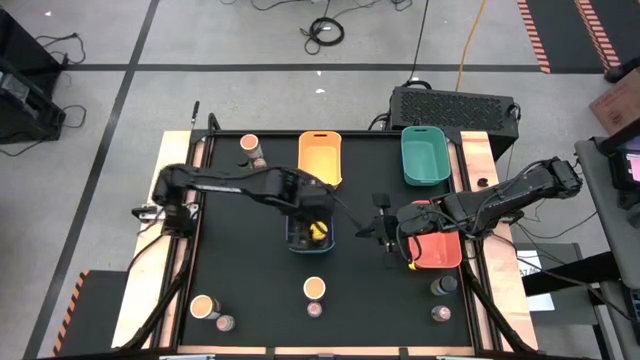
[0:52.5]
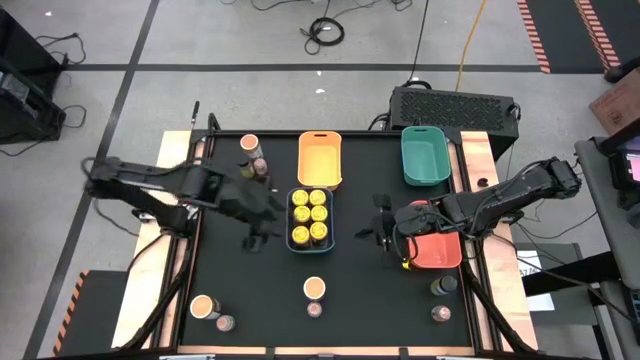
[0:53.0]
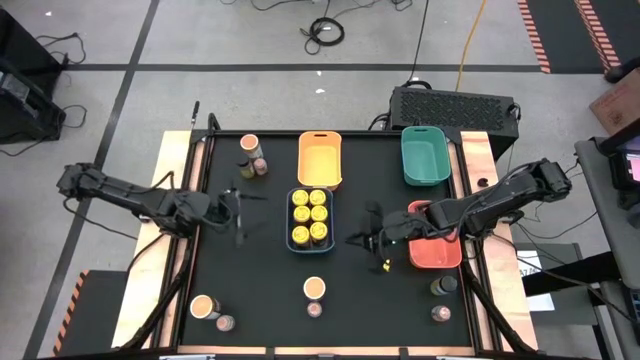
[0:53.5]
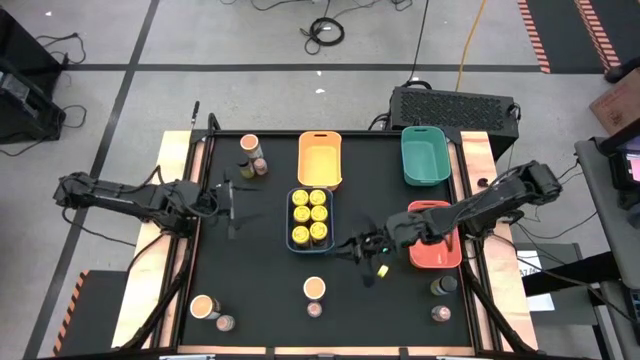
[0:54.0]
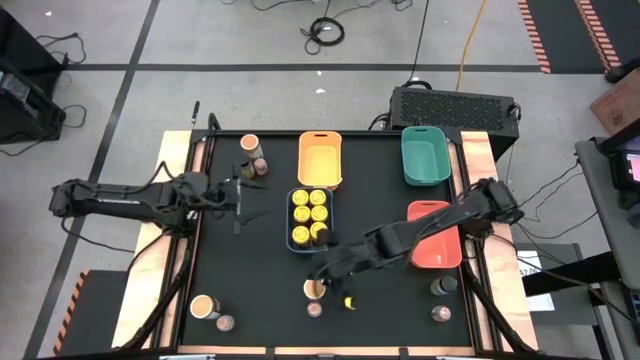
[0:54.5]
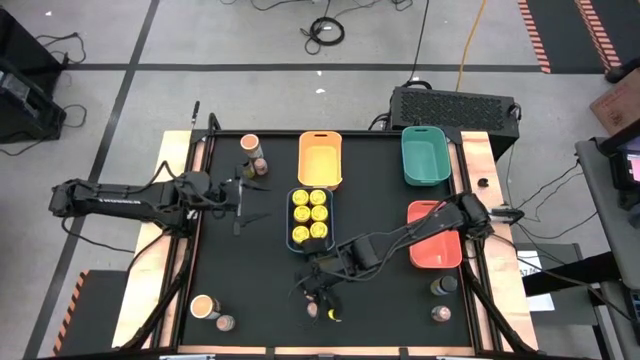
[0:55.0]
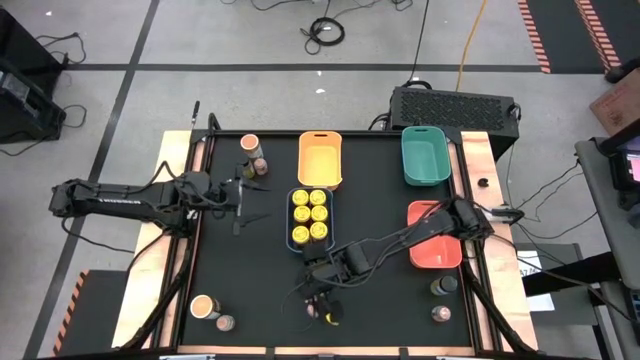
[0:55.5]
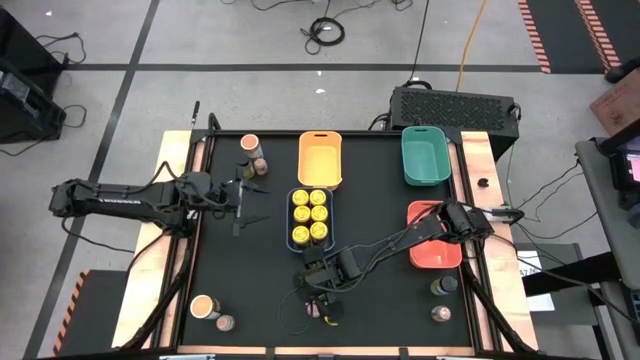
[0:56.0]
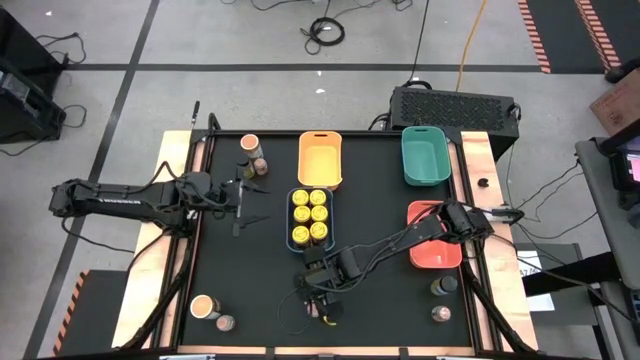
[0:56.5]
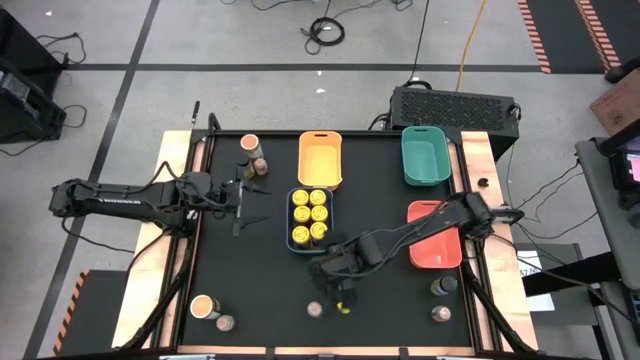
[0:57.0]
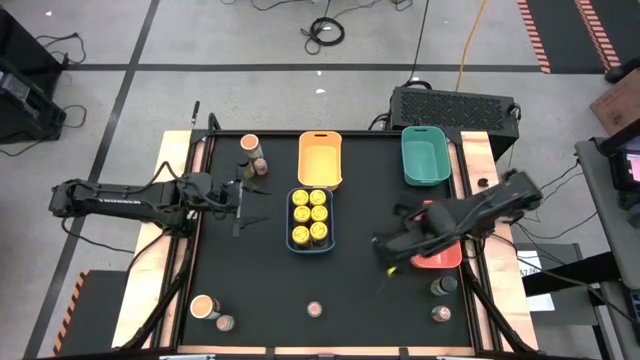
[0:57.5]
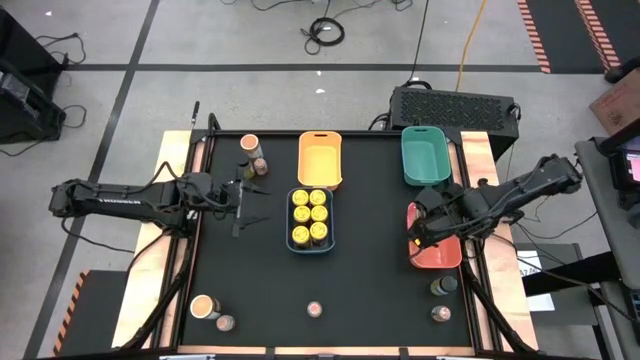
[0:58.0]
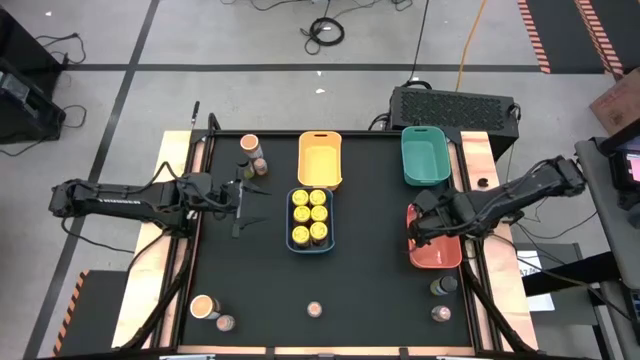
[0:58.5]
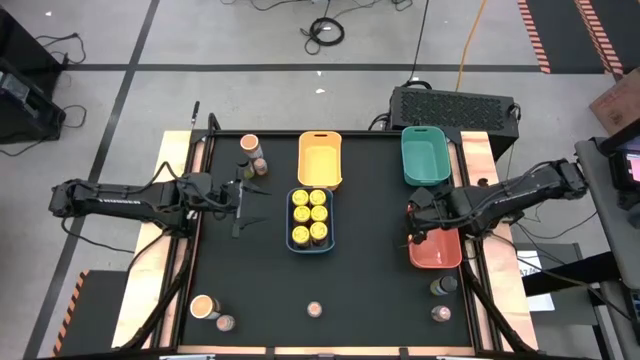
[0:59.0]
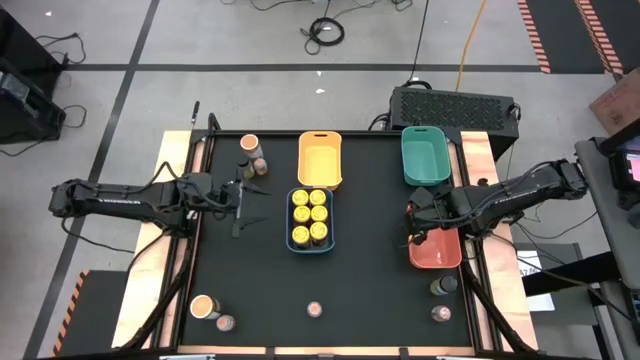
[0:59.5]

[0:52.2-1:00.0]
Task: Sort spices by type
Put the gold seasoning bottle into the orange bin

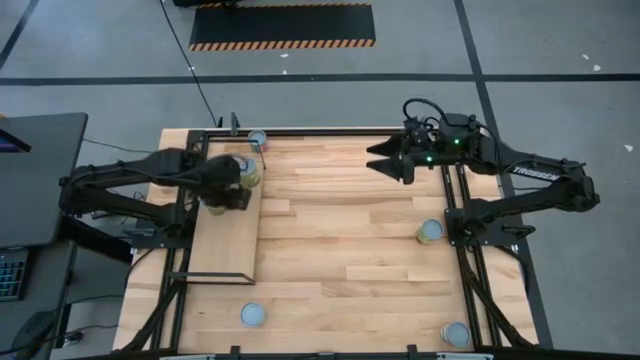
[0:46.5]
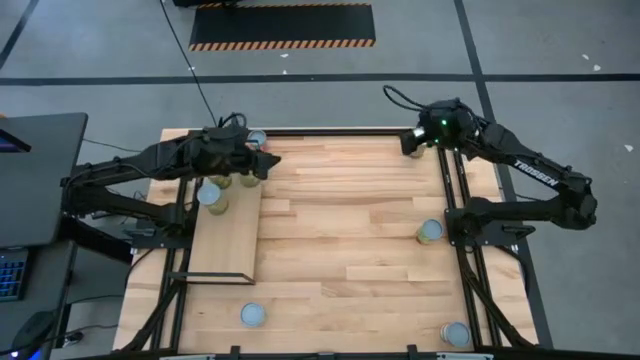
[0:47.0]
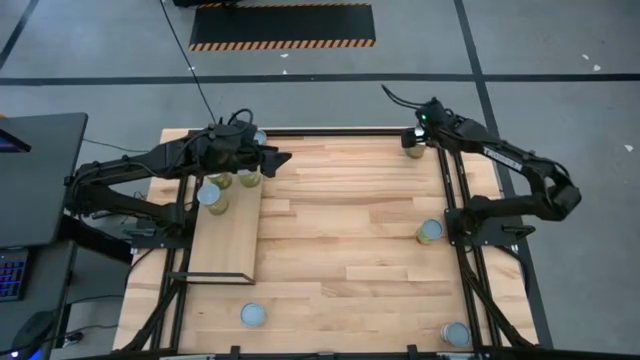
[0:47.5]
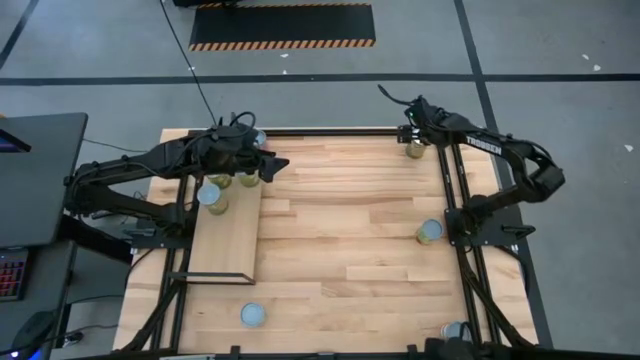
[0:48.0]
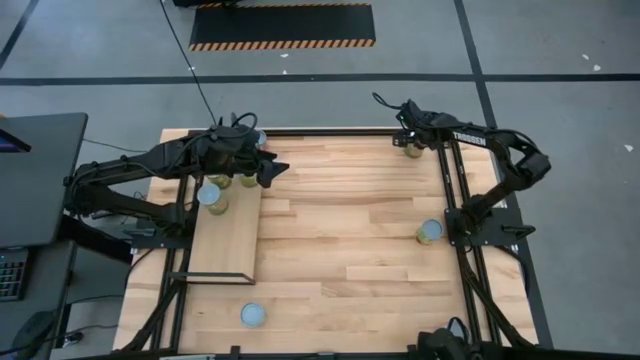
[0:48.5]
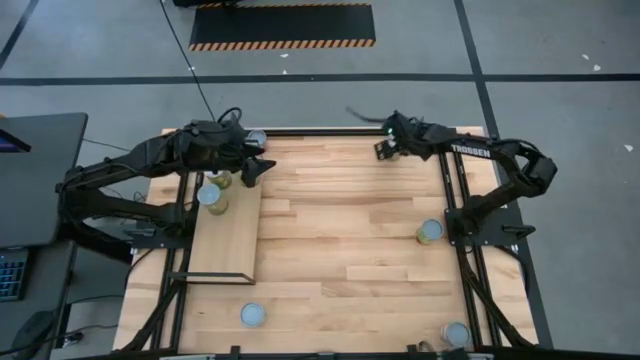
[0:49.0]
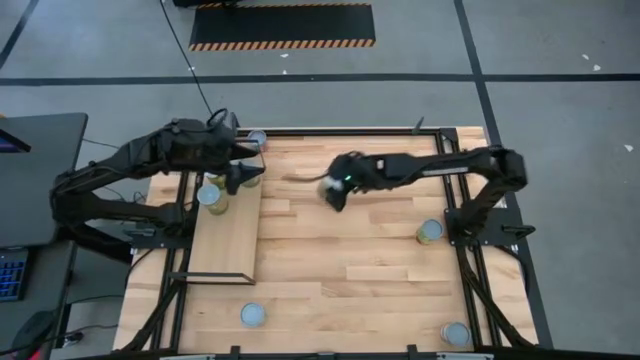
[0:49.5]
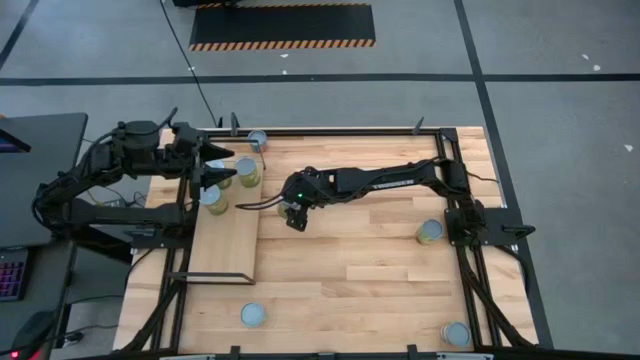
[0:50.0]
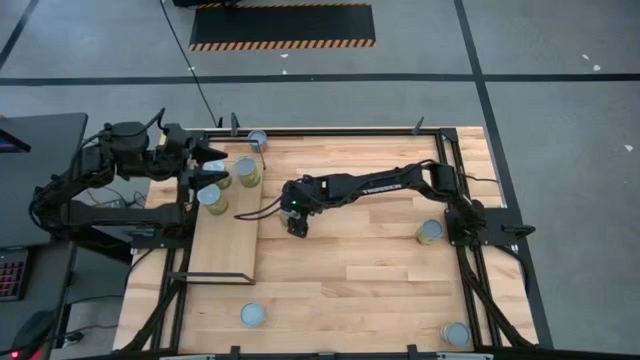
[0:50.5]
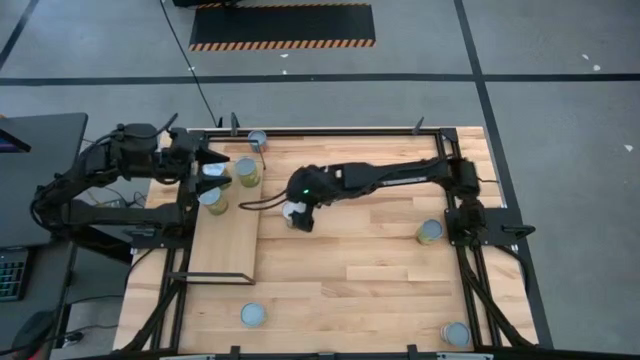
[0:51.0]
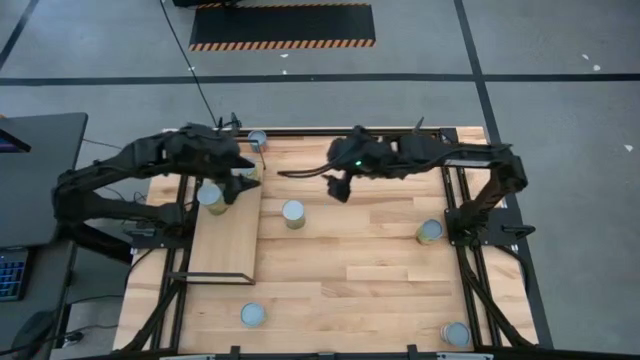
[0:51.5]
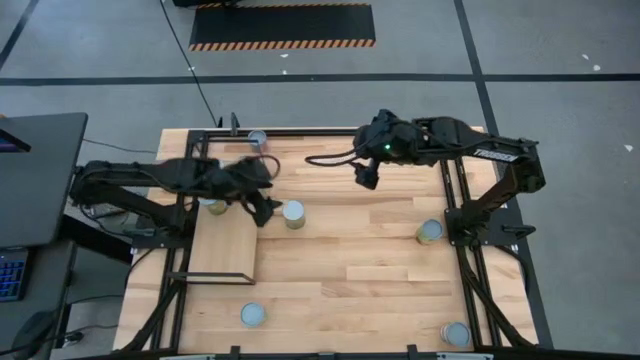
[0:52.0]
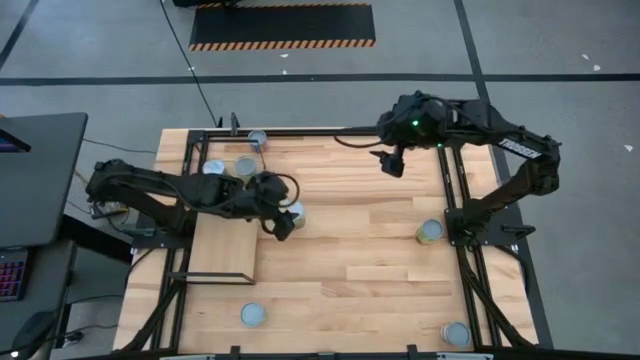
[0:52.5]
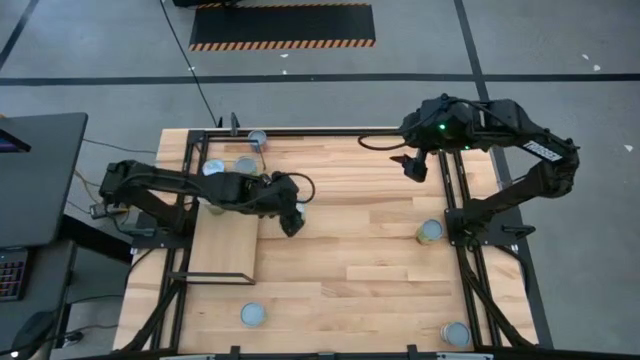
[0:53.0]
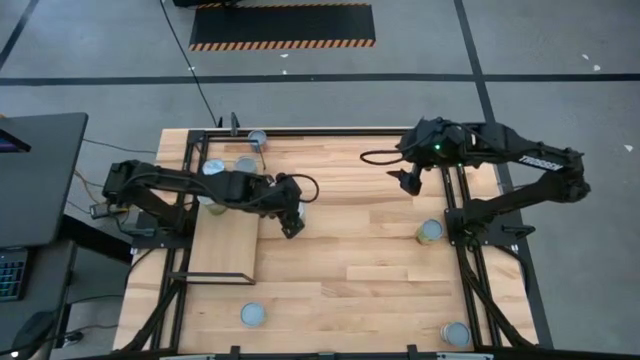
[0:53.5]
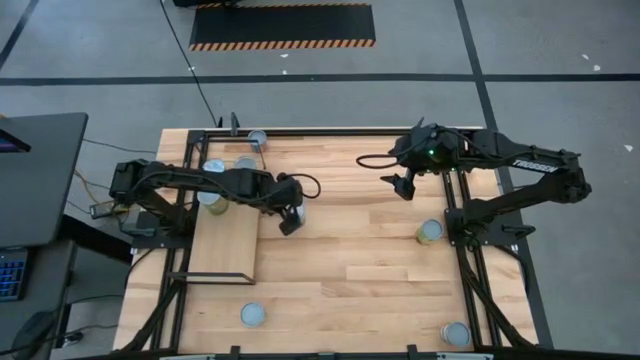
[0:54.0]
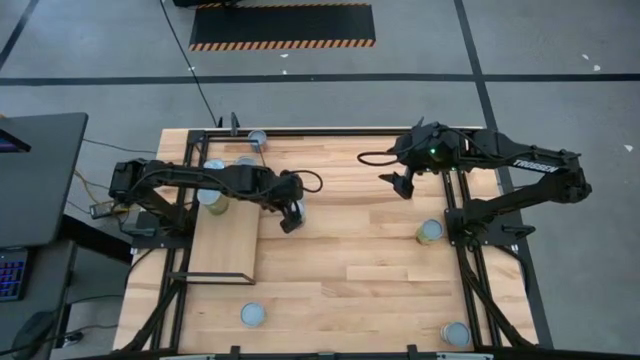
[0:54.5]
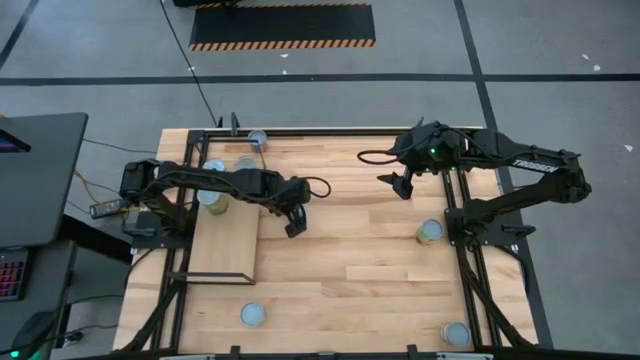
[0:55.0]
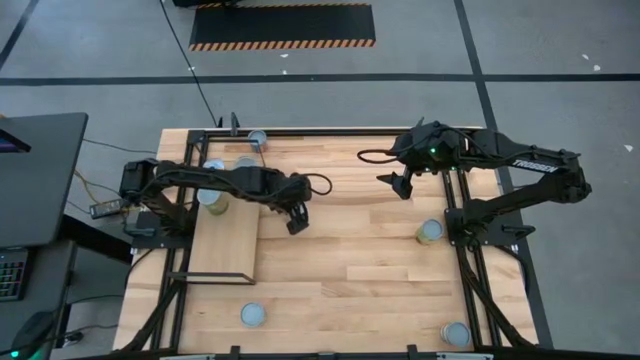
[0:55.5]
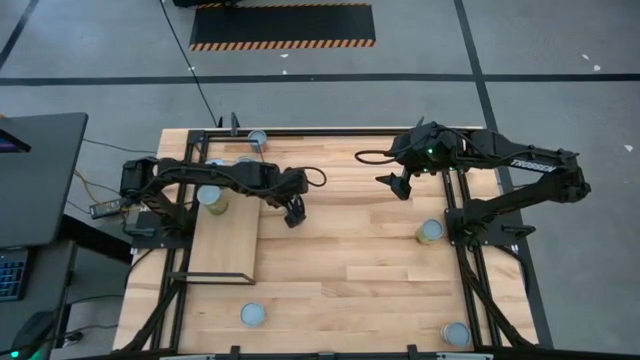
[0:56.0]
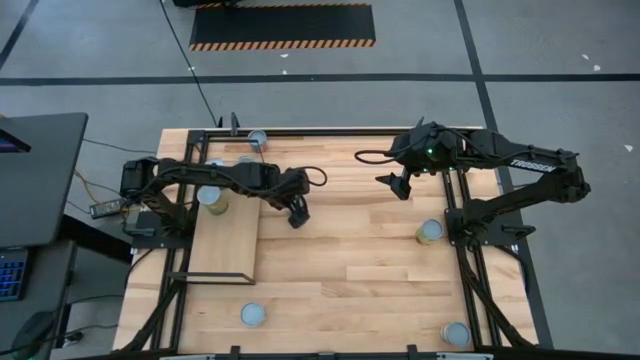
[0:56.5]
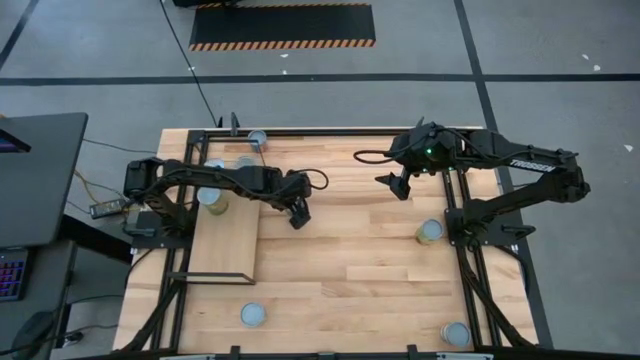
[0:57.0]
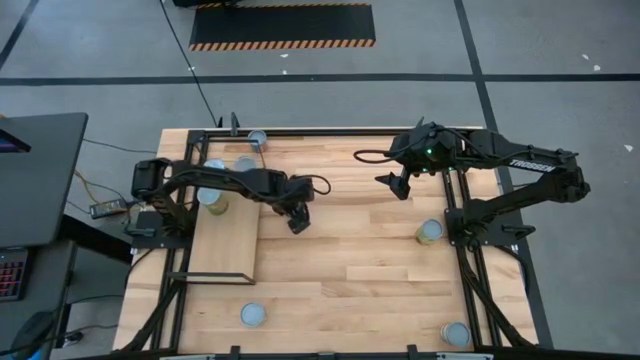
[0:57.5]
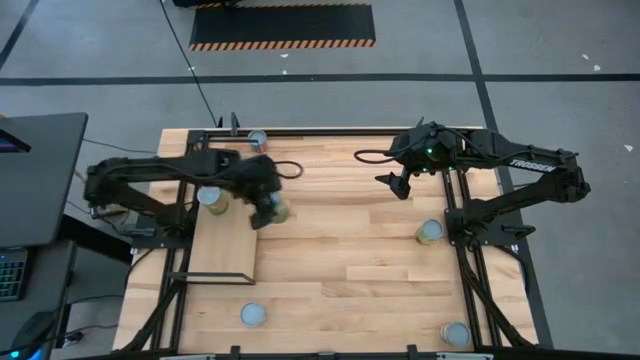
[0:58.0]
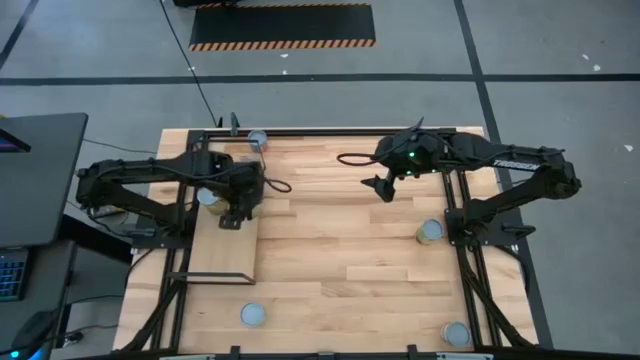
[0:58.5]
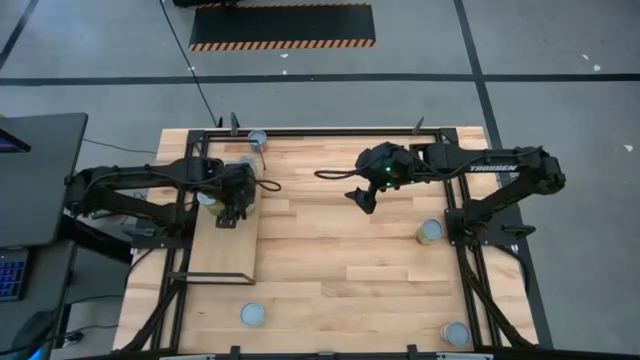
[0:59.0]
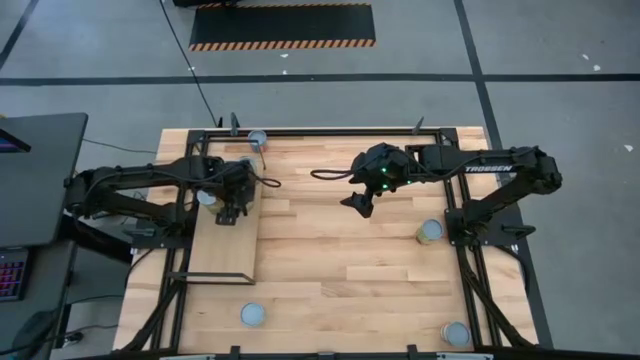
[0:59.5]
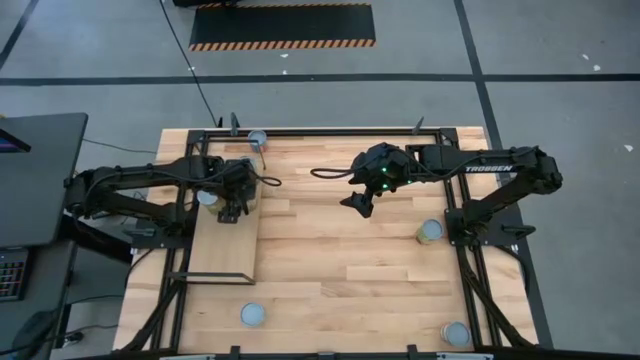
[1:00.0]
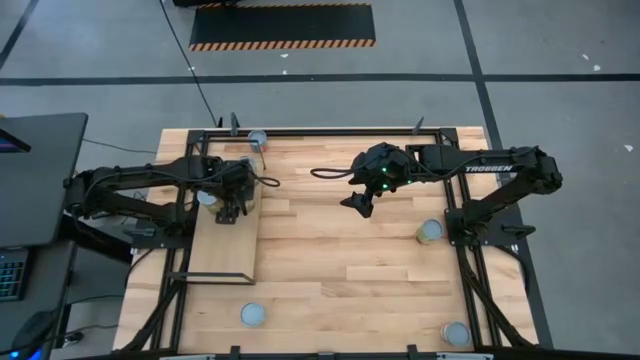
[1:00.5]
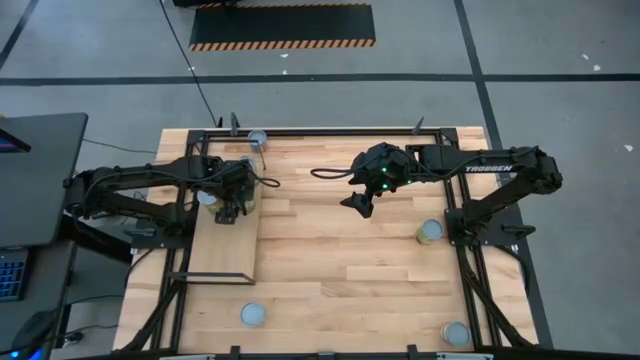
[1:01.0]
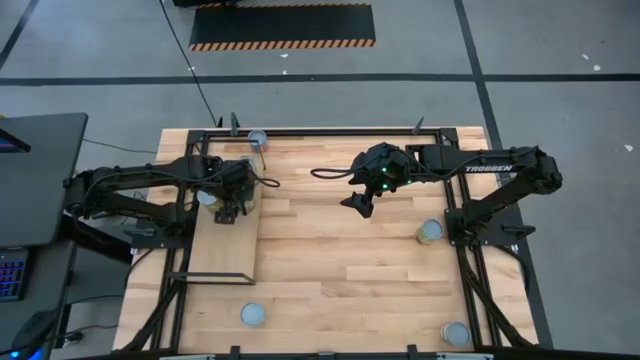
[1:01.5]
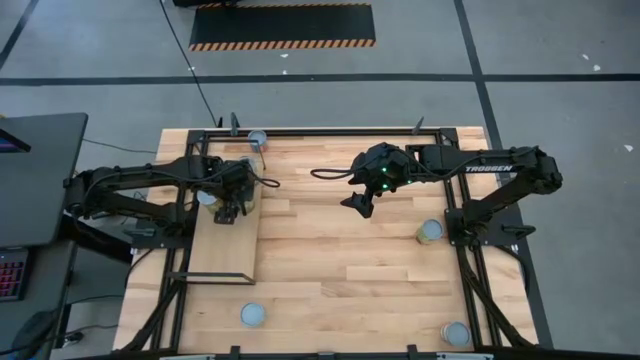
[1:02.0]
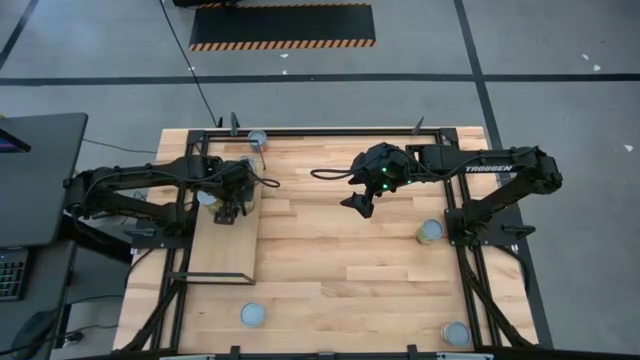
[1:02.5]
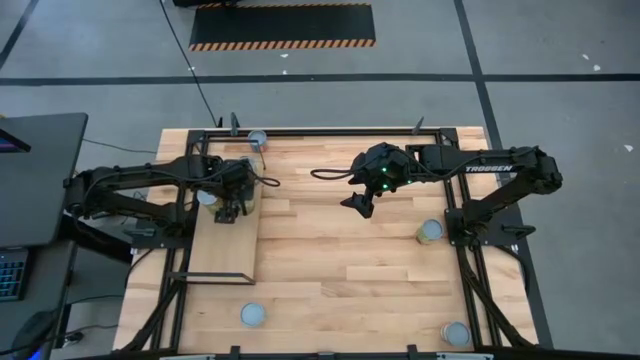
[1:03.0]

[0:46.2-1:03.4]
Task: Pick and place cans onto a shelf
Put the large canned oranges on the shelf aligned with the other large canned oranges
